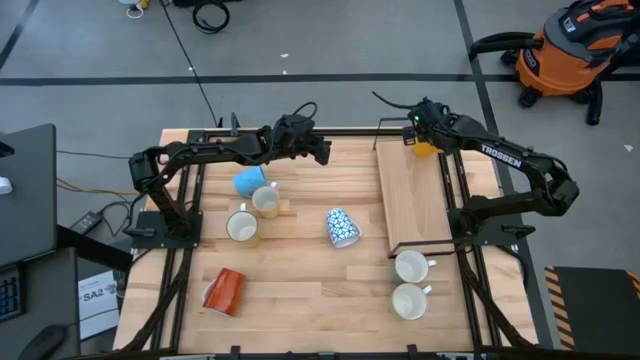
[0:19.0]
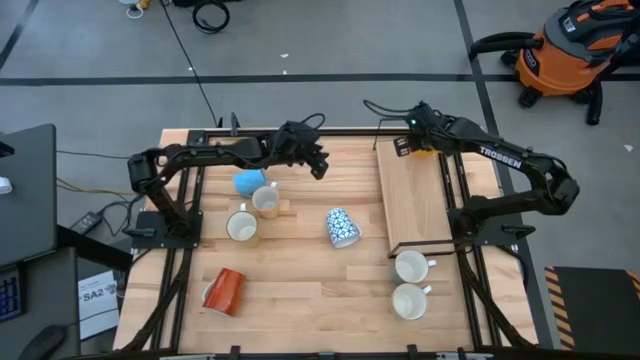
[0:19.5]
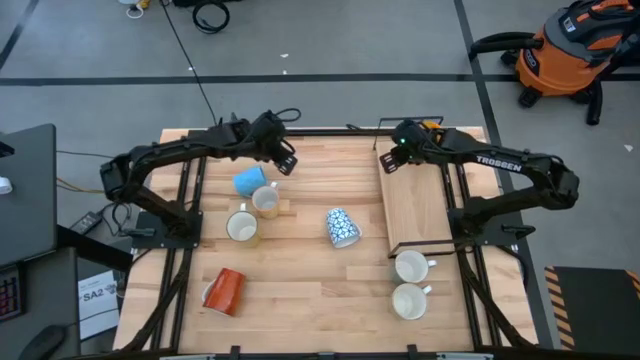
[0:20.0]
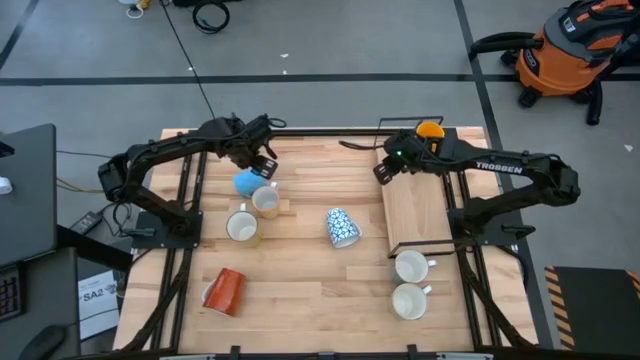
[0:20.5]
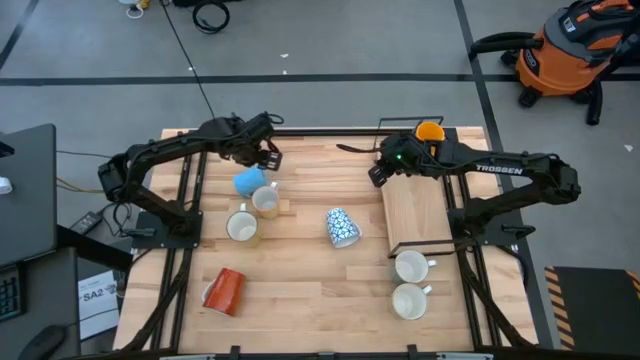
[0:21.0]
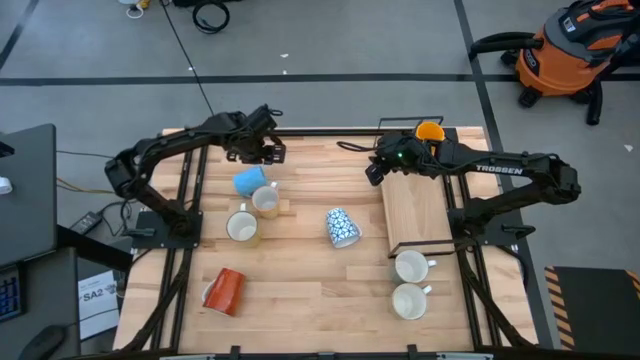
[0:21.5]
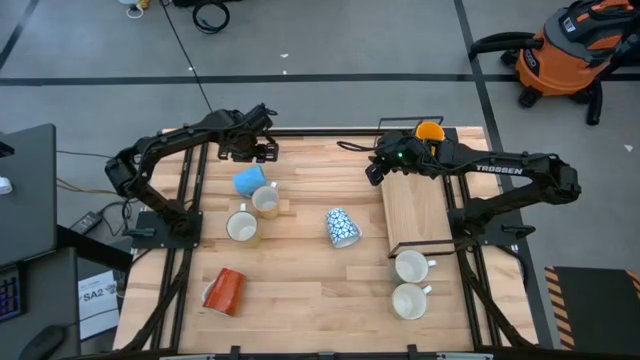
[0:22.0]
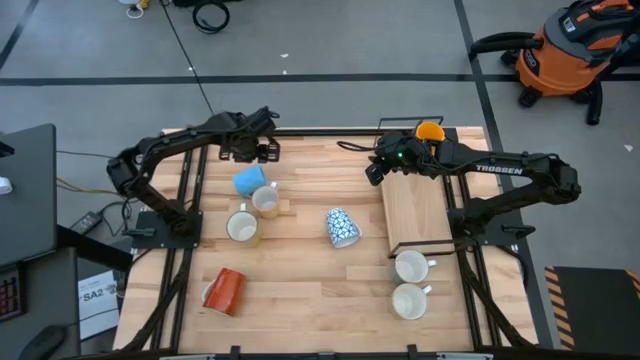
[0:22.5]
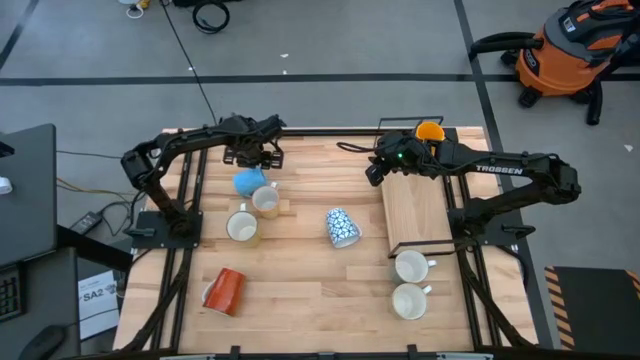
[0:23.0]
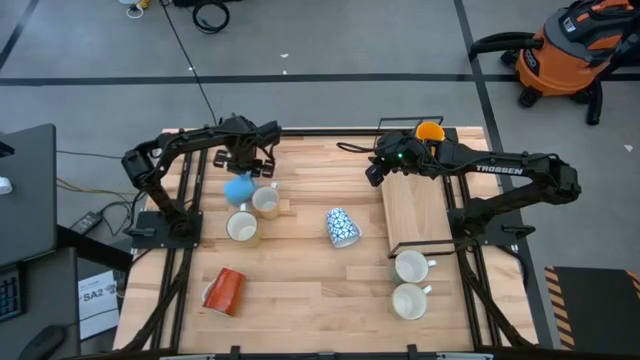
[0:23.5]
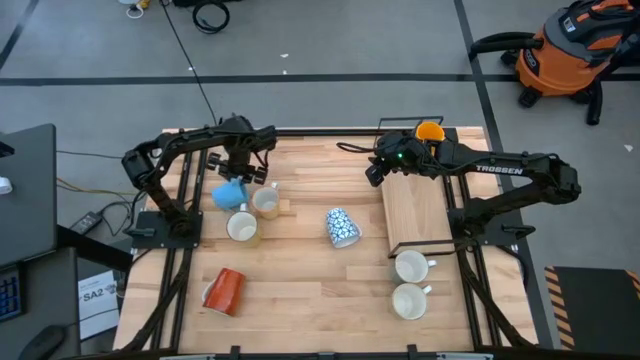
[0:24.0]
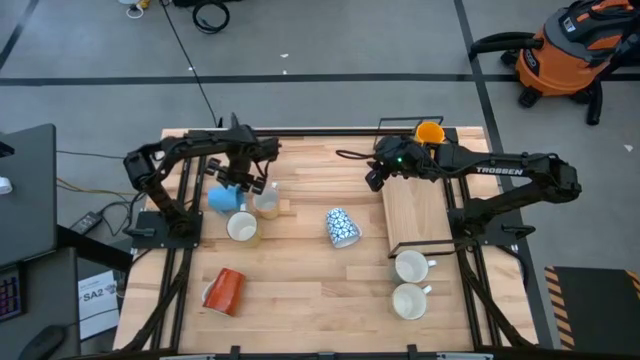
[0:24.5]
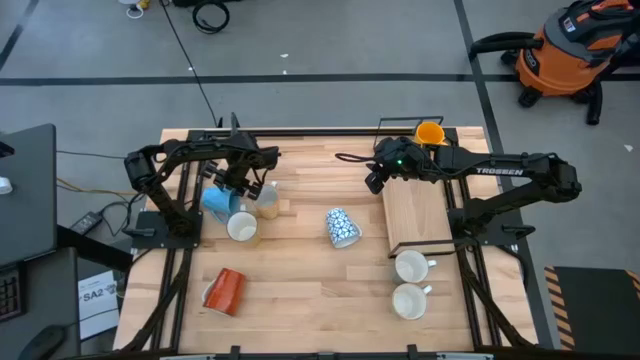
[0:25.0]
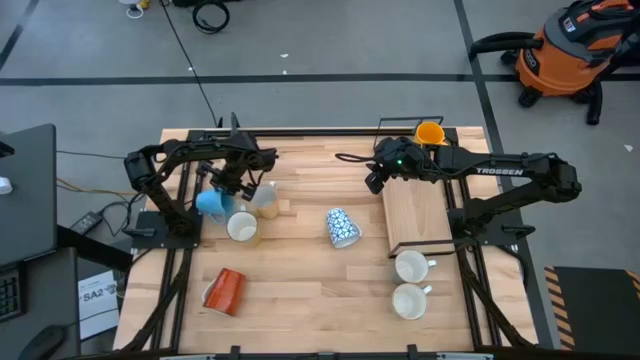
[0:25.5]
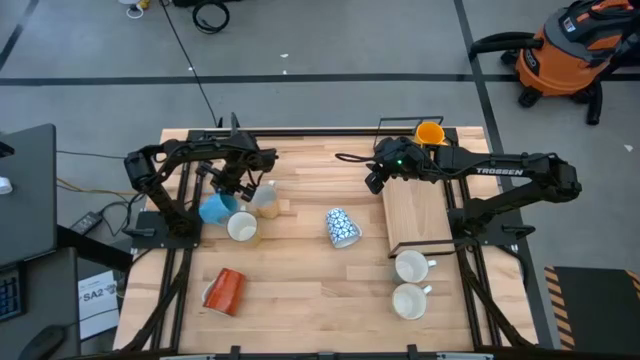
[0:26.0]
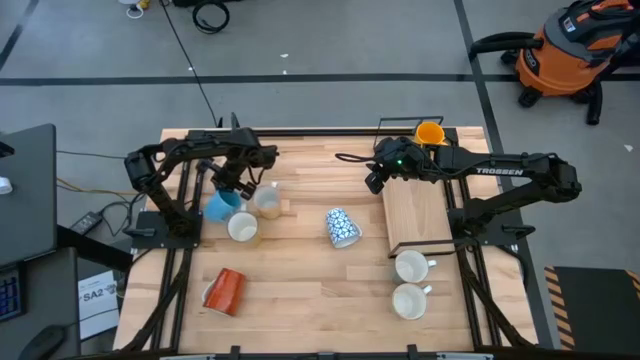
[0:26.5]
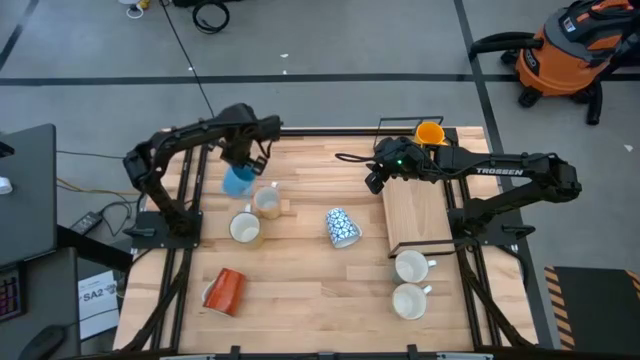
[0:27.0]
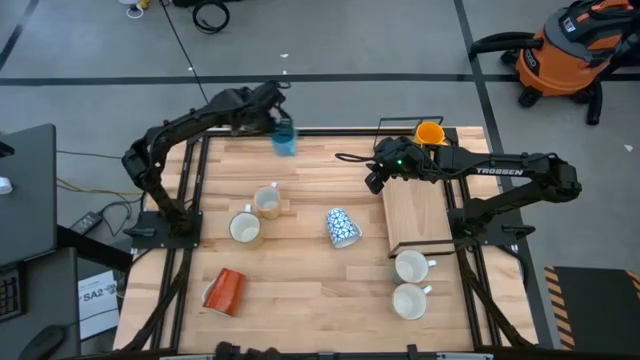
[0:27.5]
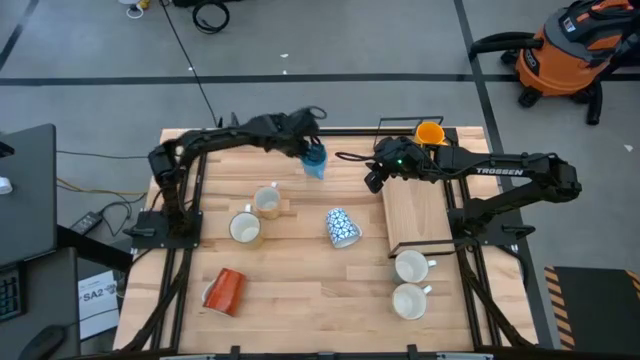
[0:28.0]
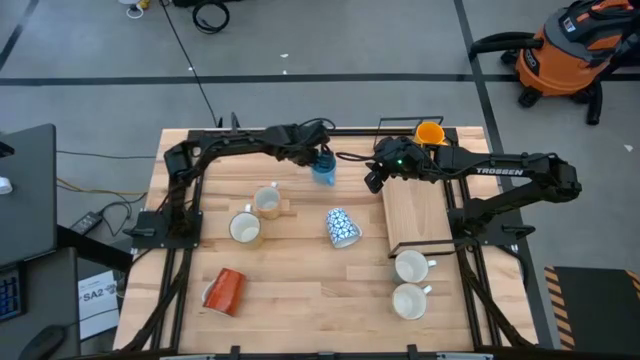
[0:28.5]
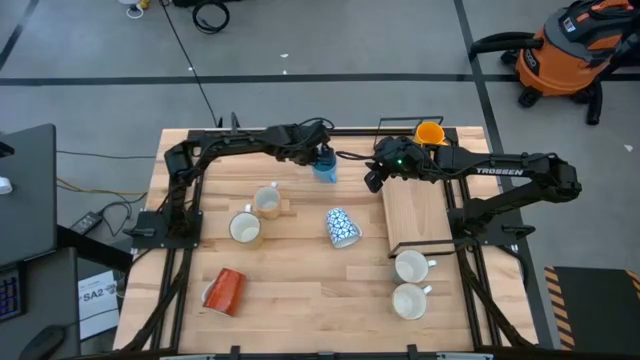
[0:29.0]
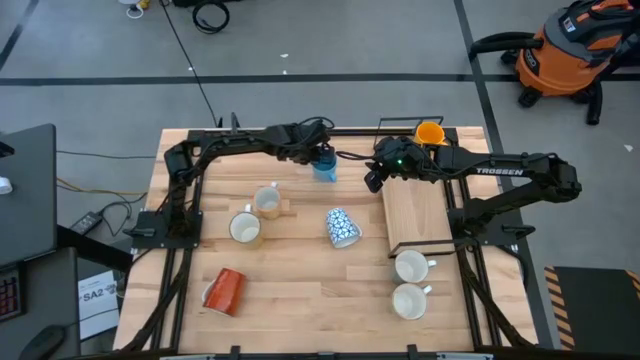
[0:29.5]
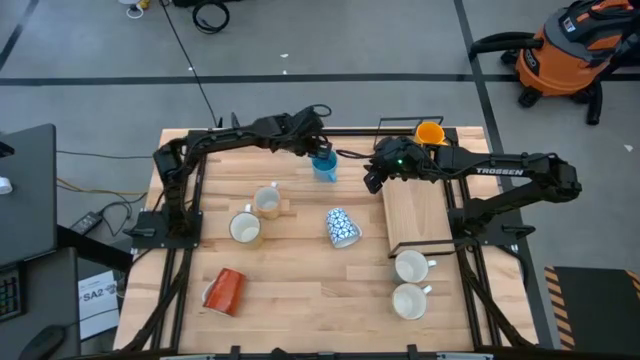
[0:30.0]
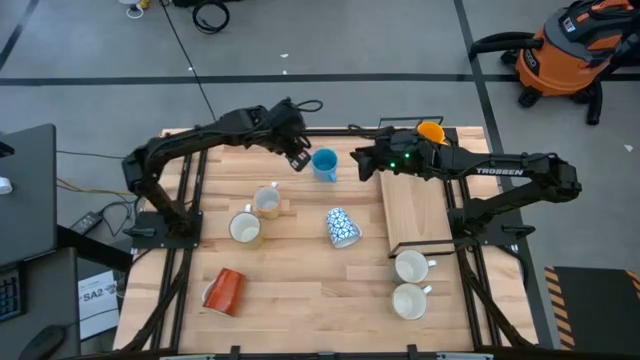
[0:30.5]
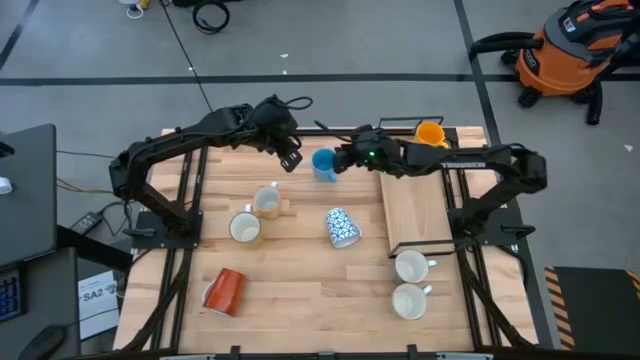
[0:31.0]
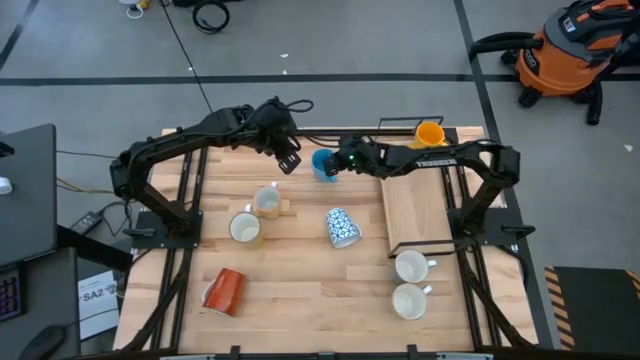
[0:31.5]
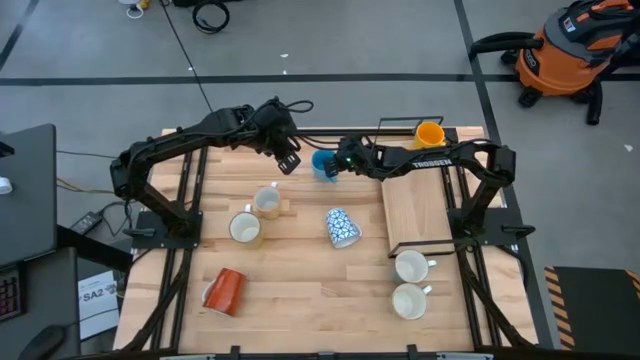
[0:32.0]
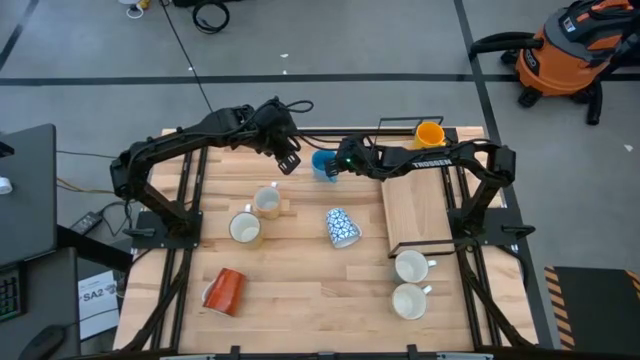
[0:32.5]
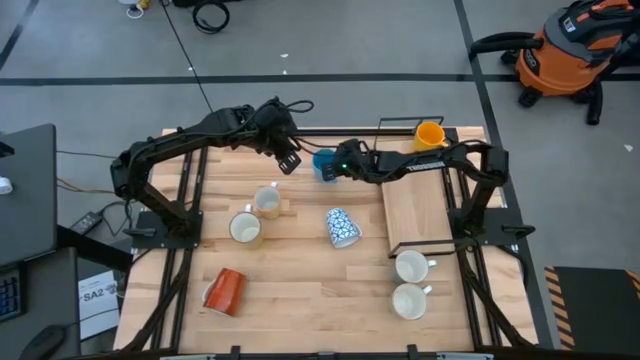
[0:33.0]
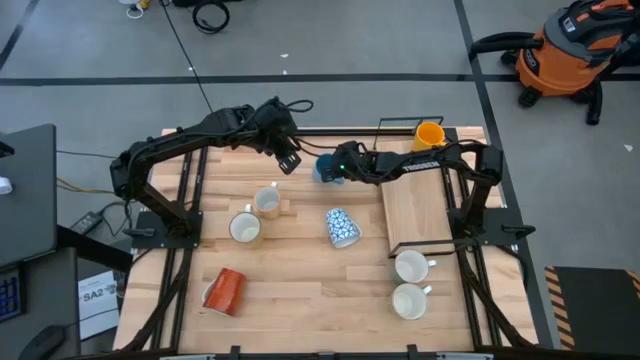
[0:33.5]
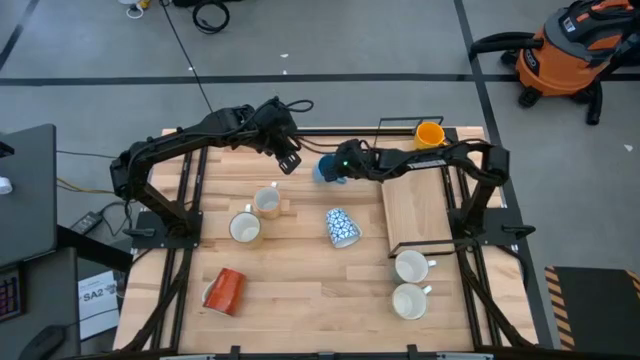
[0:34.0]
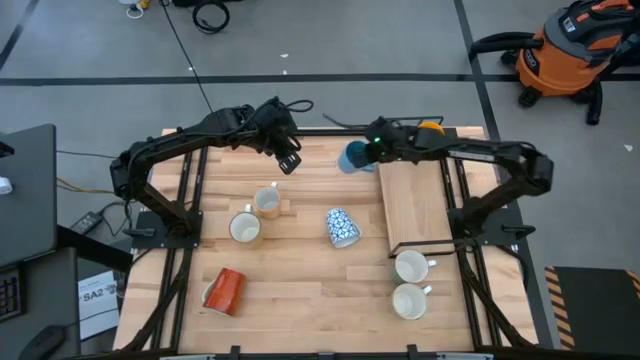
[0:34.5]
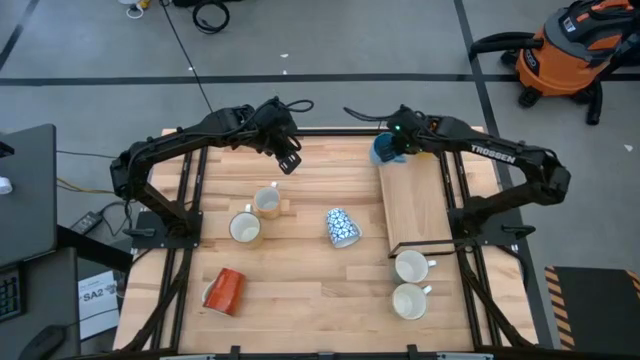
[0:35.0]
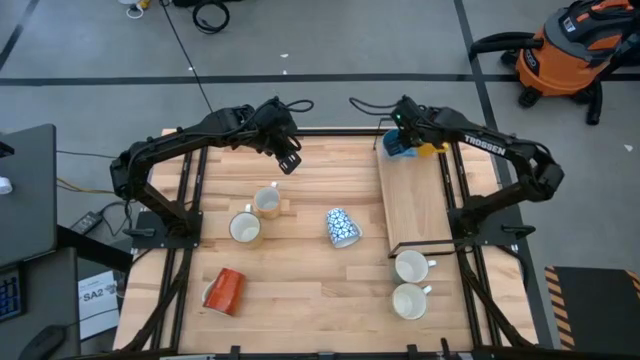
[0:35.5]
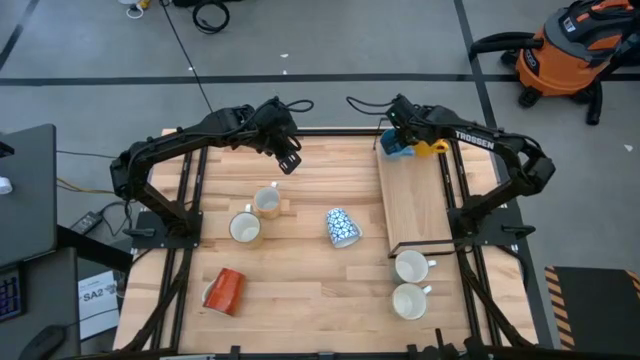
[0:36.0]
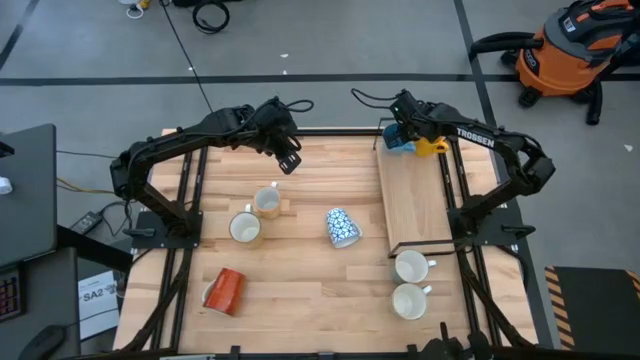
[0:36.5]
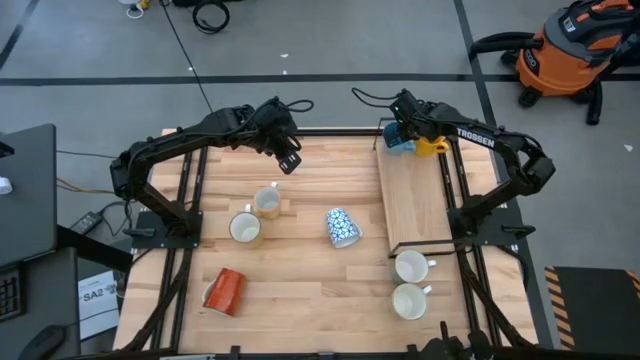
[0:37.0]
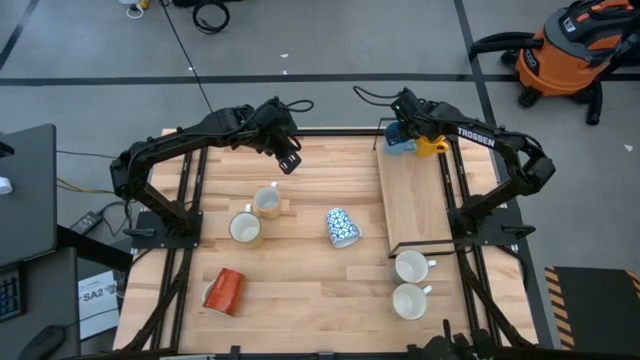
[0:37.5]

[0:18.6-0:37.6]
Task: Place coffee mugs
Put the blue mug on the shelf
